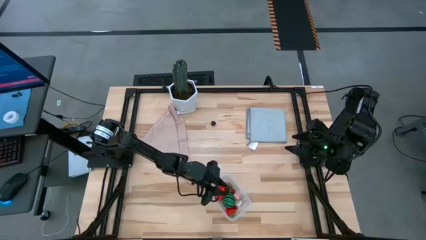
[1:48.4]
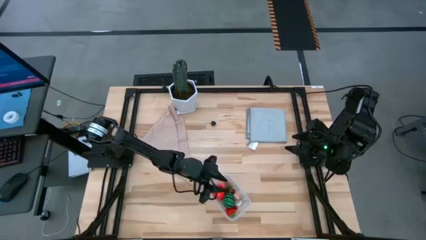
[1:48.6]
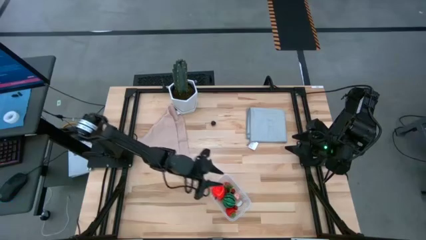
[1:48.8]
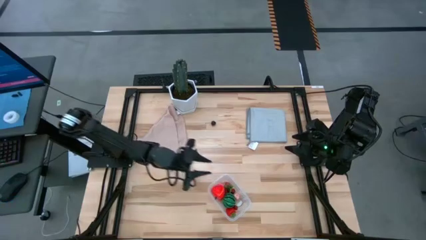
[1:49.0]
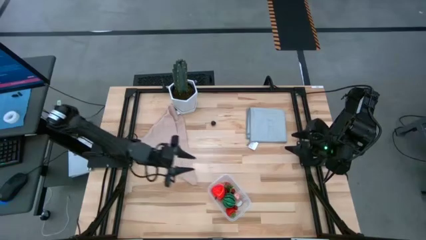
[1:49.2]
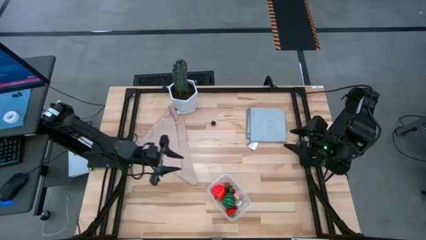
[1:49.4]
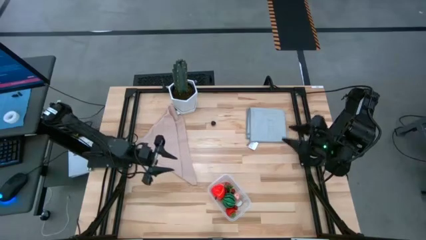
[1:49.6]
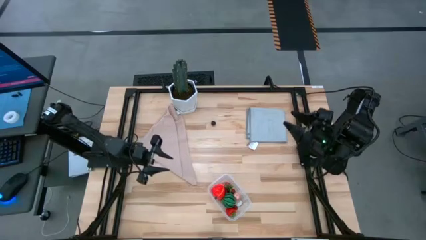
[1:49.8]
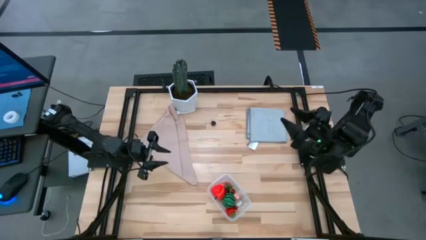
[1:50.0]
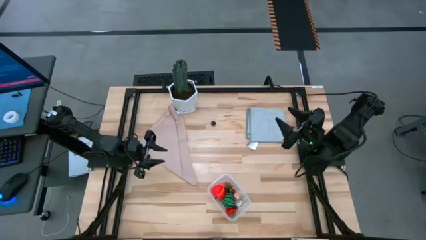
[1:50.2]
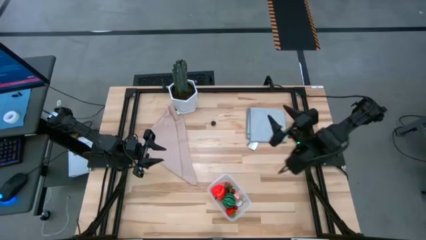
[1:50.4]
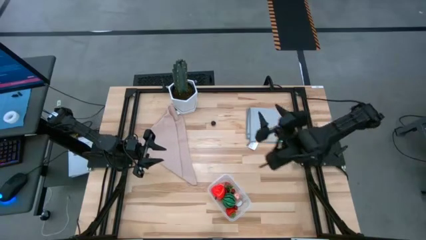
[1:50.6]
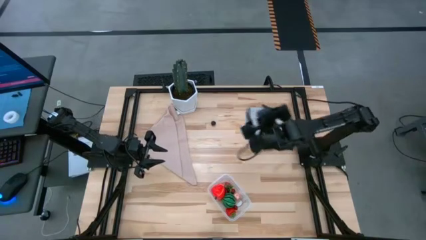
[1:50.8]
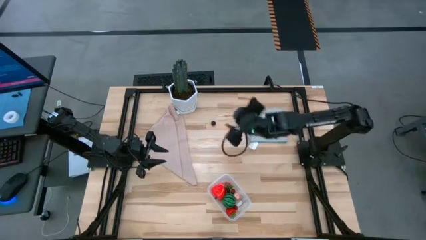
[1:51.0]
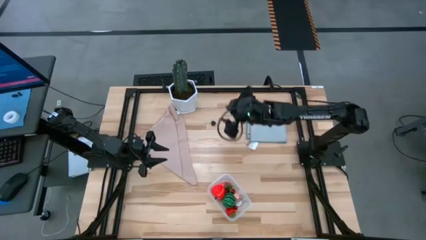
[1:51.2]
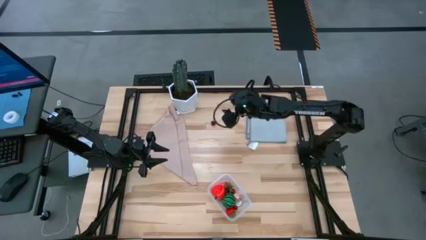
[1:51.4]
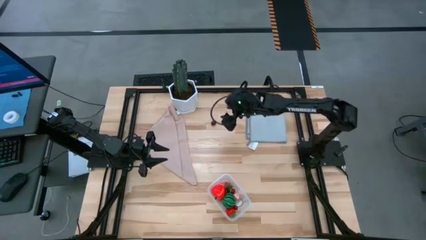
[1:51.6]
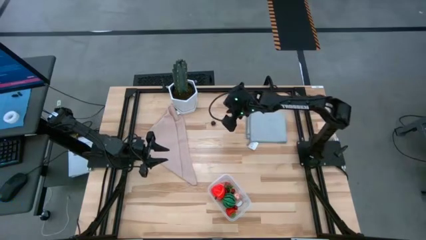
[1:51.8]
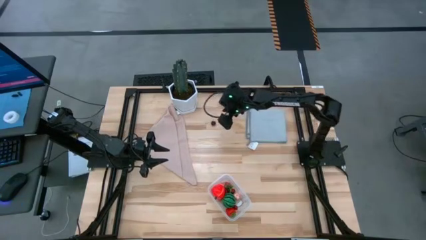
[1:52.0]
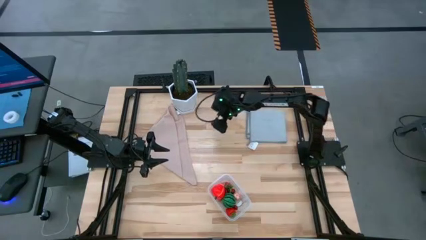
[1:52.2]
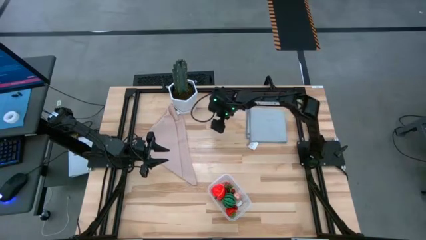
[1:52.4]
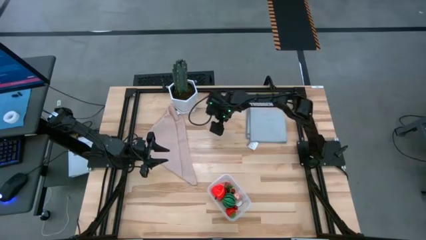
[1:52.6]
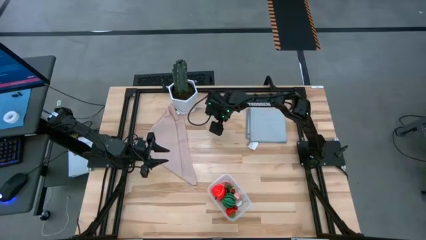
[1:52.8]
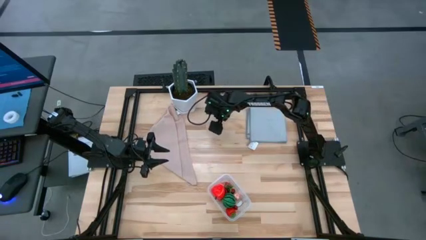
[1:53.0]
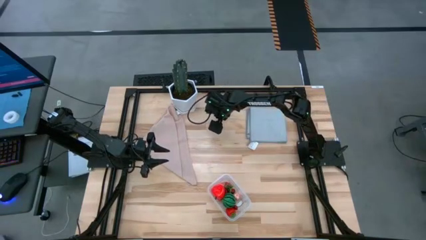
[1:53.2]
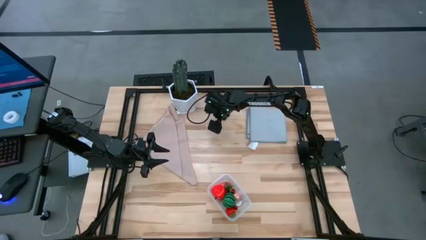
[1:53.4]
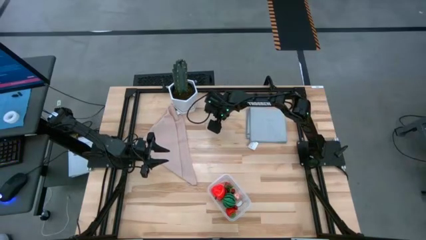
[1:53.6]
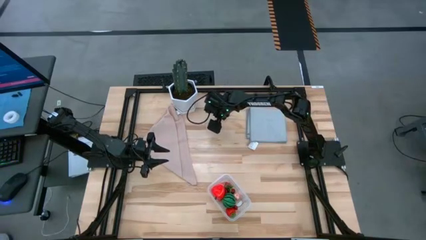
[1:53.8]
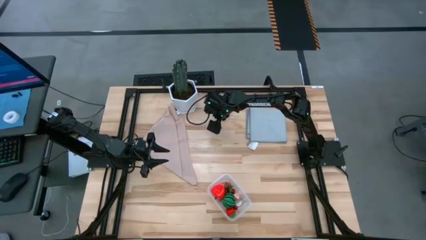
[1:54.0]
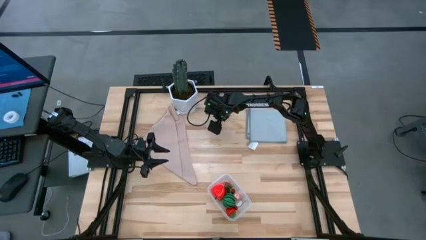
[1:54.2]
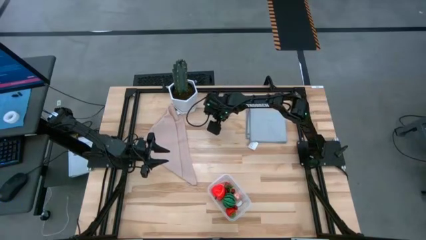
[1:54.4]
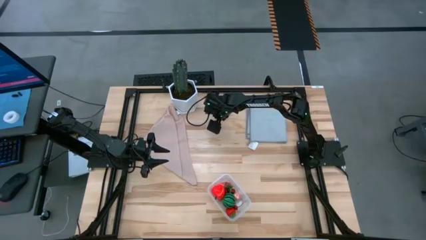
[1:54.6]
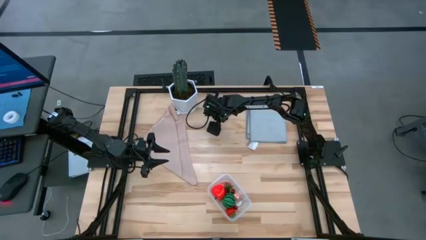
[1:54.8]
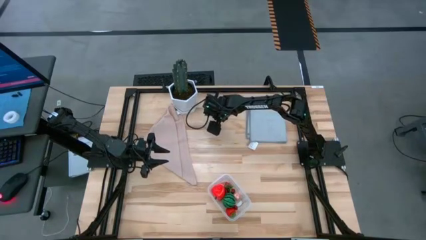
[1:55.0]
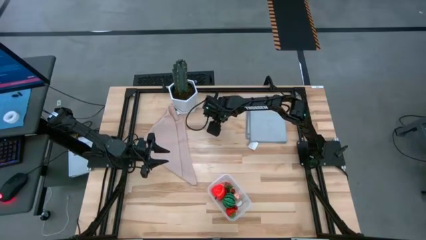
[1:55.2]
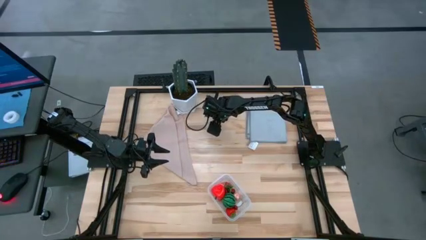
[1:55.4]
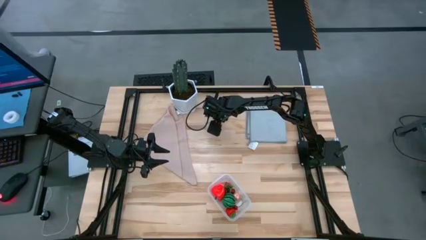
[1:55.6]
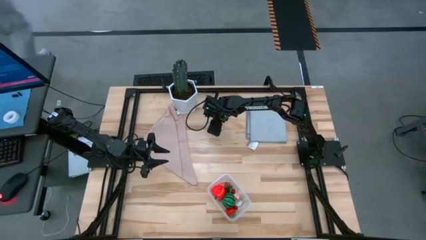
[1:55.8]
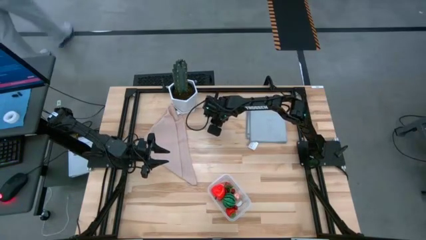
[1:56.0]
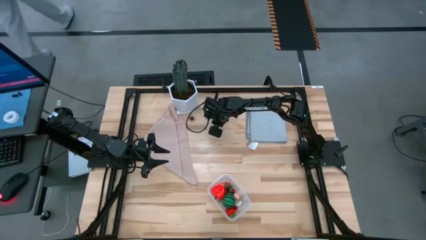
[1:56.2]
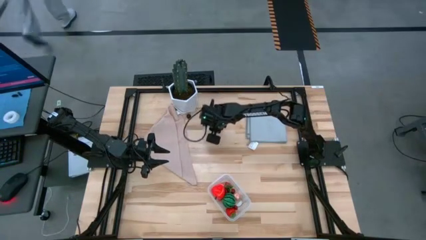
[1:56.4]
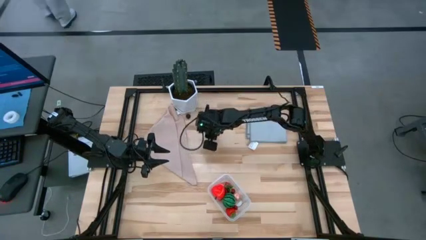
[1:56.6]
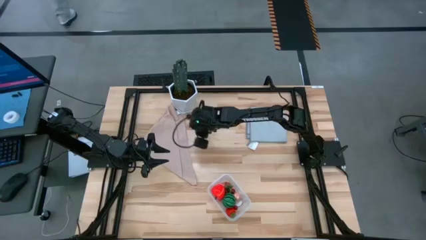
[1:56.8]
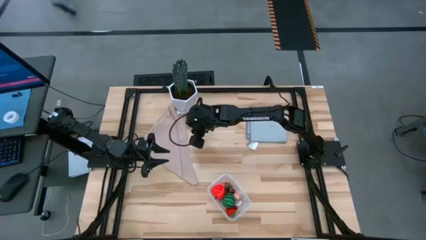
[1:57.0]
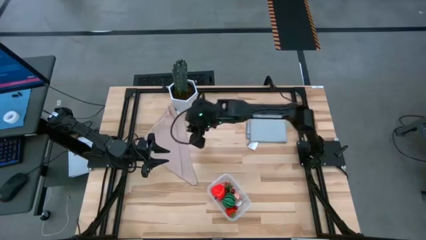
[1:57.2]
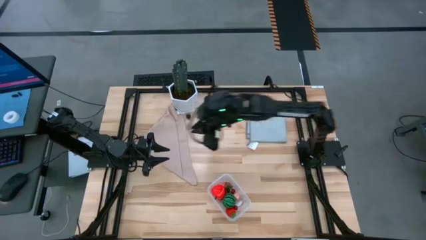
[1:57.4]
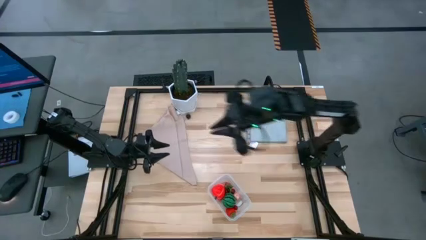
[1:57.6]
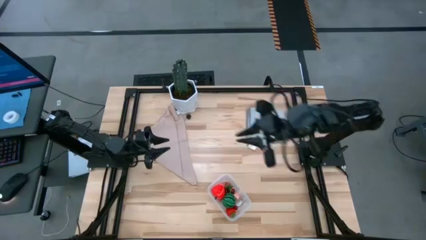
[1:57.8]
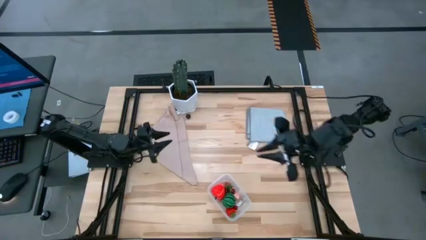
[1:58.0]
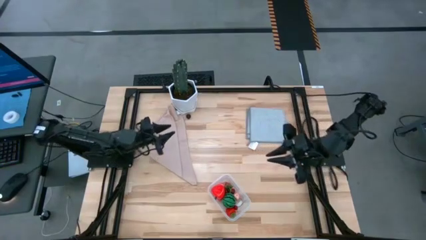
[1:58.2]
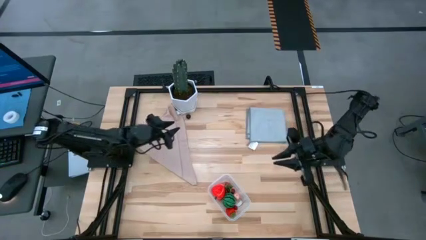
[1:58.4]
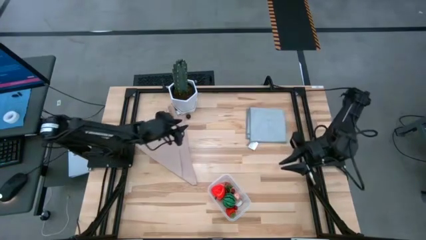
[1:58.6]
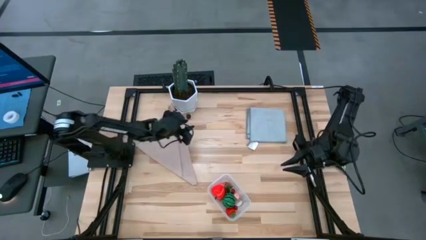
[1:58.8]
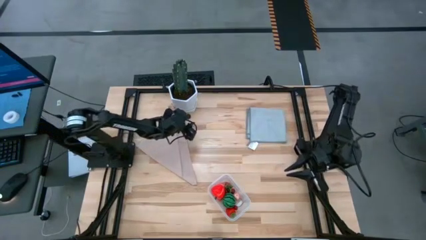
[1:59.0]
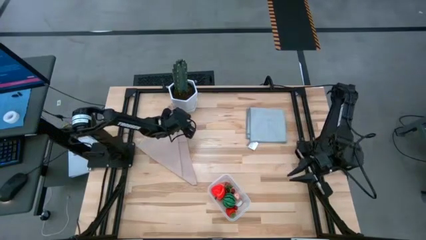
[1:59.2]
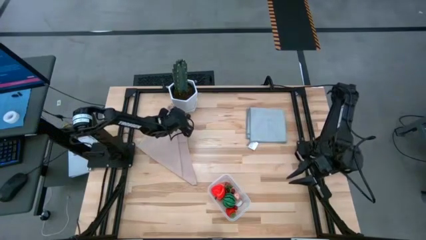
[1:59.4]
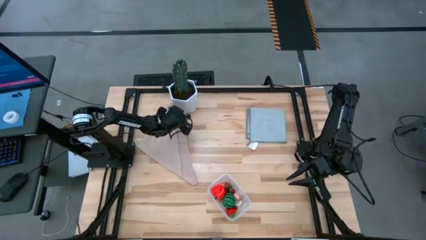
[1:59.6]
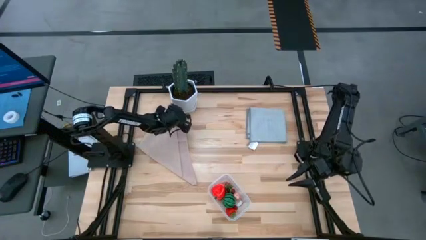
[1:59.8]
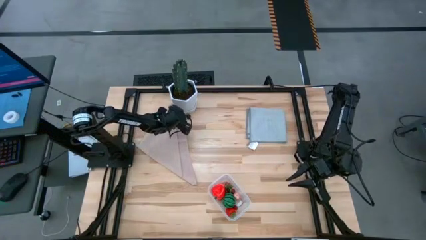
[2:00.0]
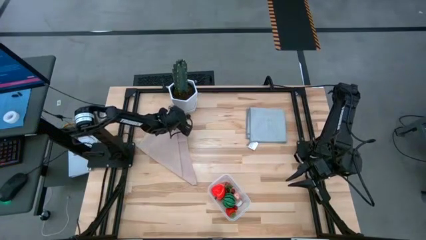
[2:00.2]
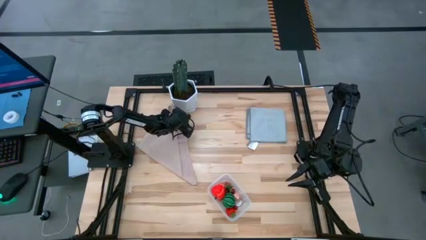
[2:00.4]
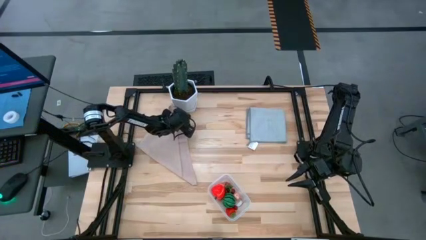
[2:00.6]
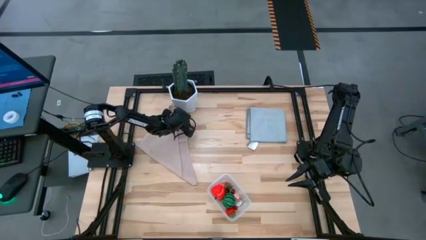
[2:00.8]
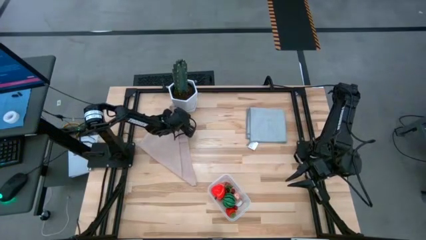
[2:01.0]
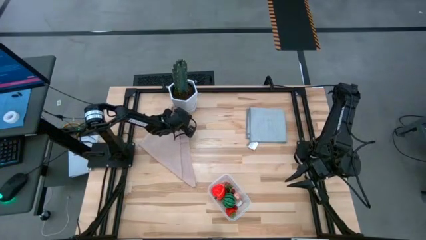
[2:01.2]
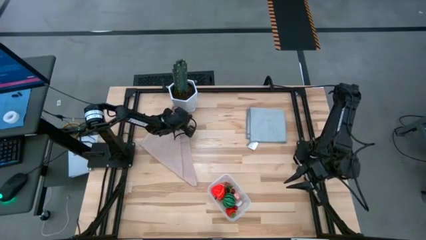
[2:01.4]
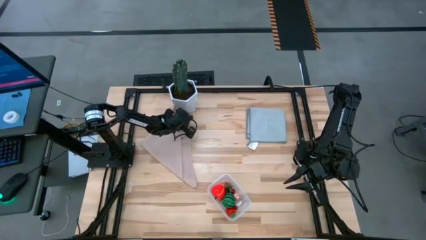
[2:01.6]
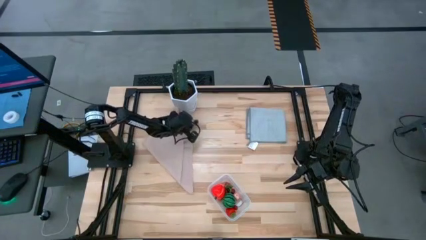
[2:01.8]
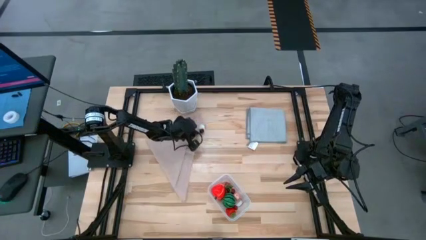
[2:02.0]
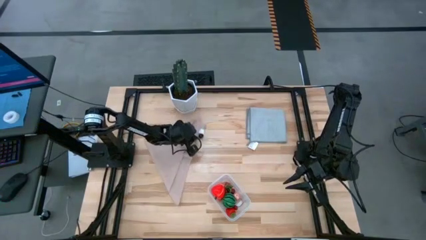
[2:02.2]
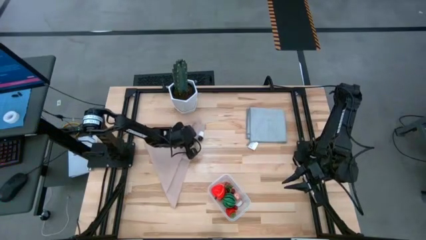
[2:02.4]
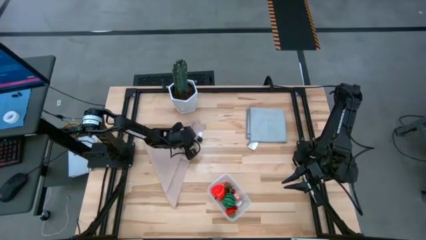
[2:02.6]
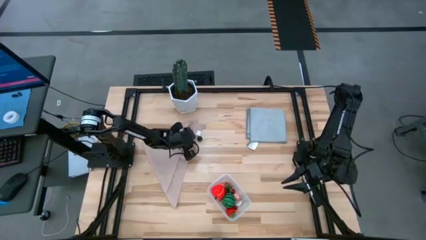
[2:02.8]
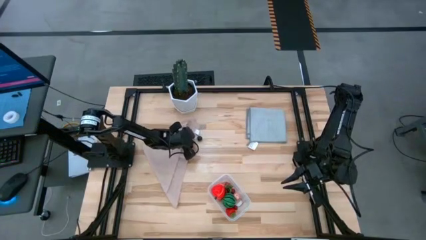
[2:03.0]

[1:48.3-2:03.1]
Task: Pick and placing Produce into tupperware
Put the black cherry into the transparent bin

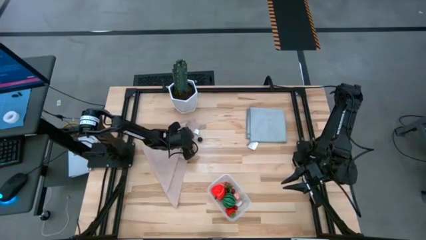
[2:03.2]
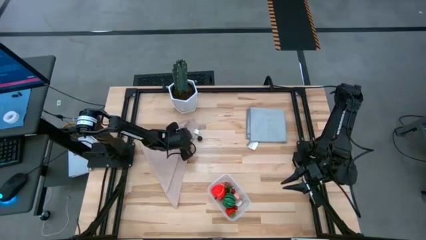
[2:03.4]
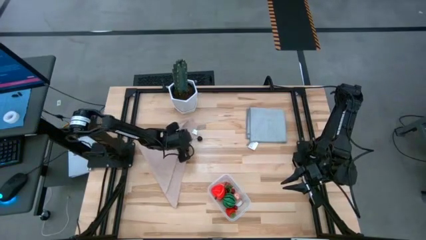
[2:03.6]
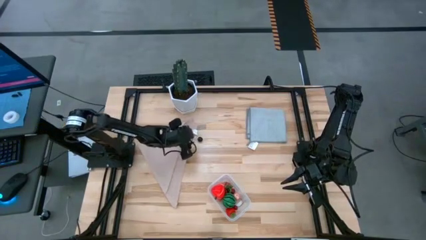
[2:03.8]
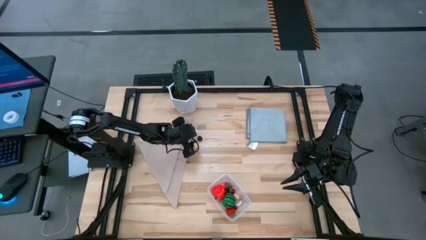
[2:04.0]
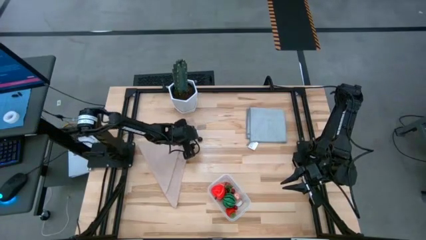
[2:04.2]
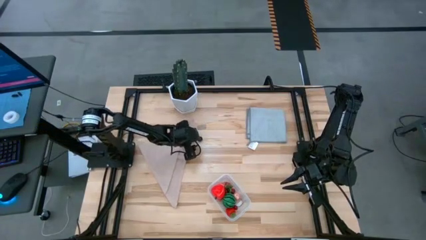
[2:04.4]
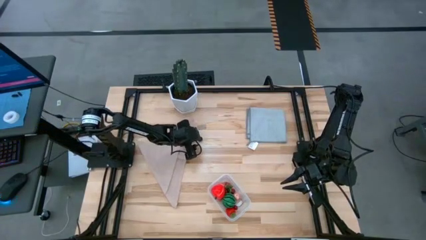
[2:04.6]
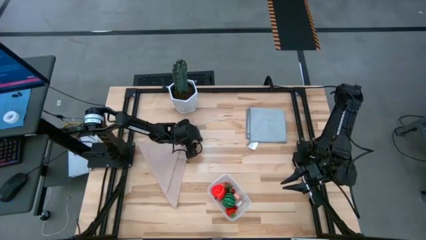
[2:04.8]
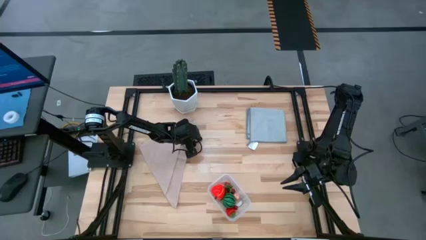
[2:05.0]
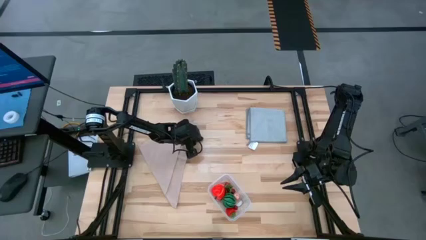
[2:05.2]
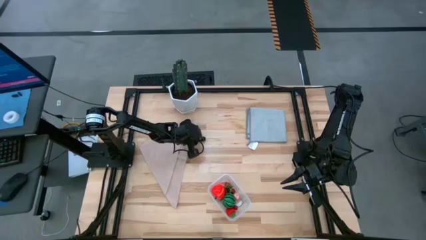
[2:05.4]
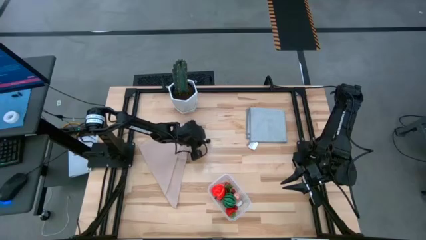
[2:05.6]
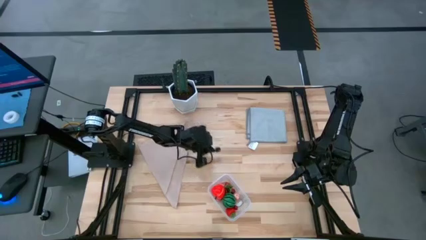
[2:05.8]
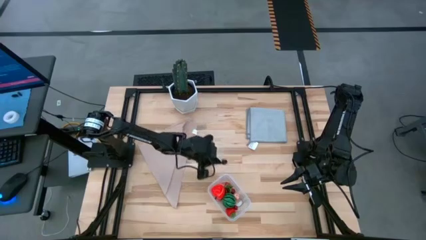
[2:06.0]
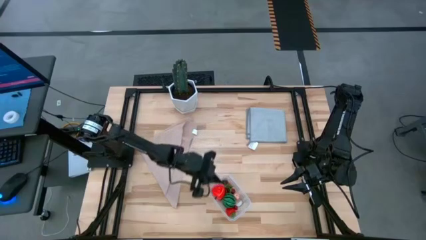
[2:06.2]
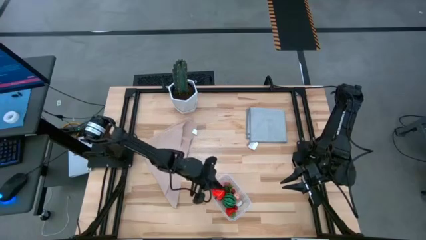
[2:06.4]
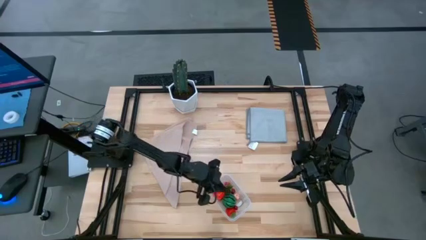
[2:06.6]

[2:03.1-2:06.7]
Put the black cherry into the transparent bin
